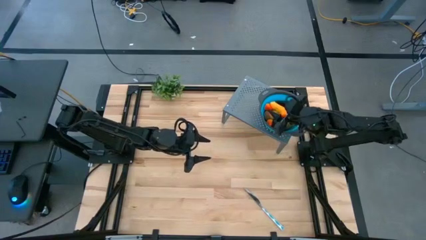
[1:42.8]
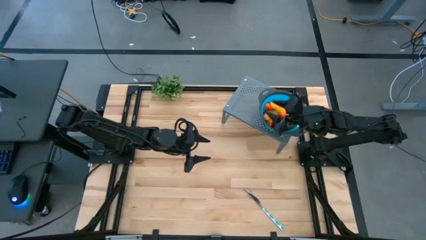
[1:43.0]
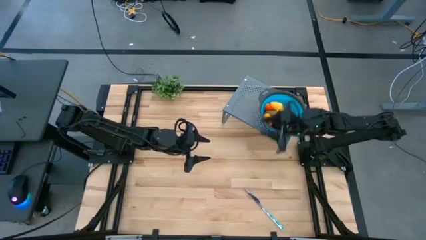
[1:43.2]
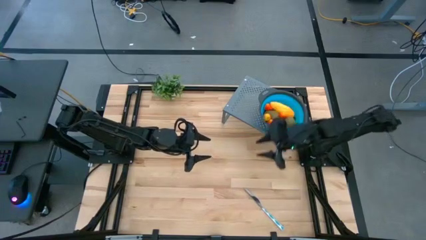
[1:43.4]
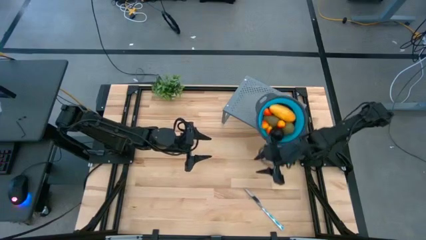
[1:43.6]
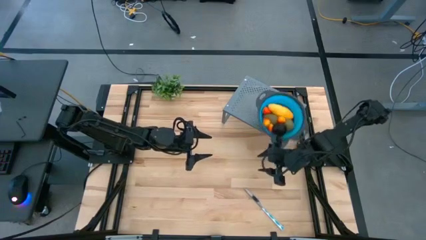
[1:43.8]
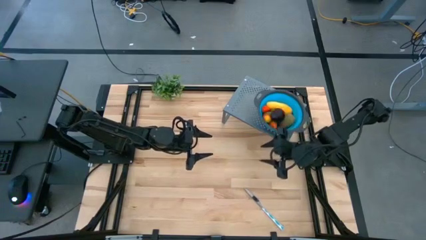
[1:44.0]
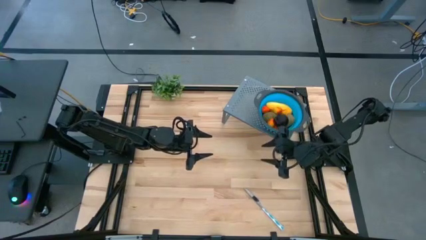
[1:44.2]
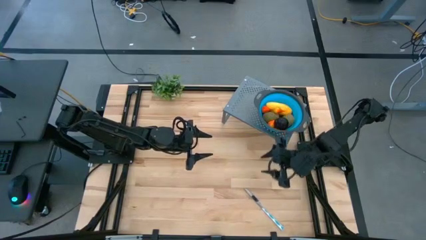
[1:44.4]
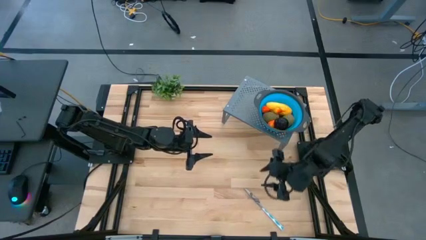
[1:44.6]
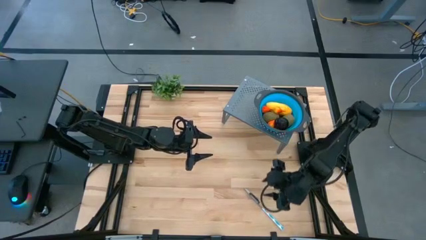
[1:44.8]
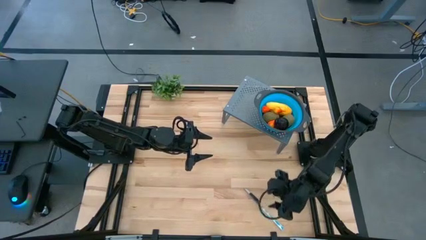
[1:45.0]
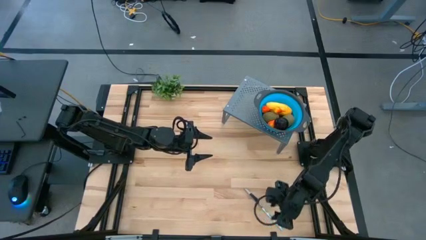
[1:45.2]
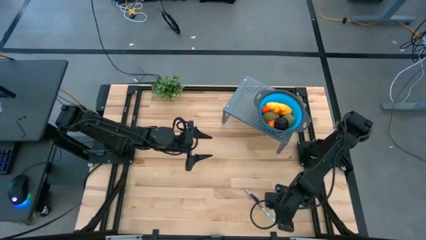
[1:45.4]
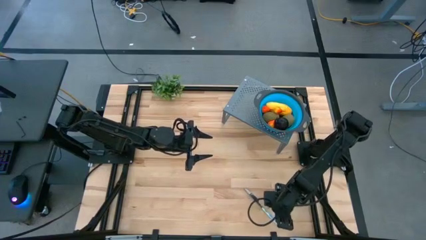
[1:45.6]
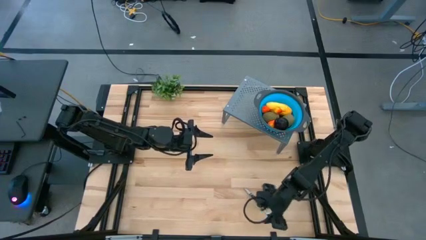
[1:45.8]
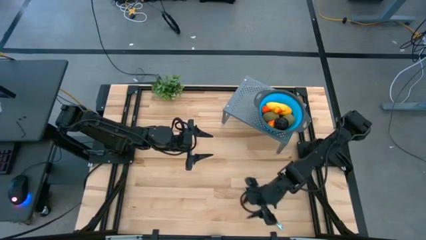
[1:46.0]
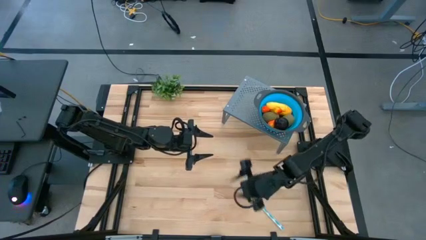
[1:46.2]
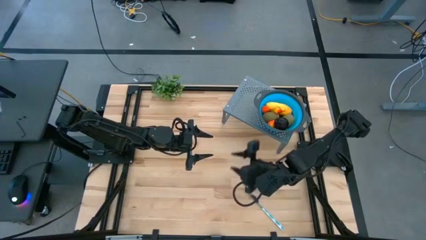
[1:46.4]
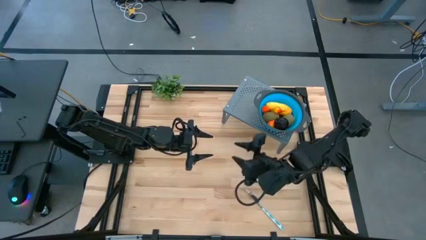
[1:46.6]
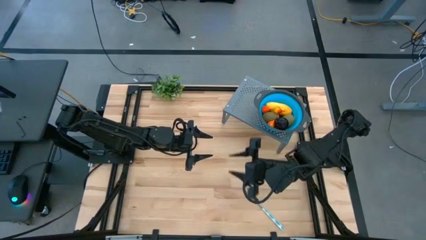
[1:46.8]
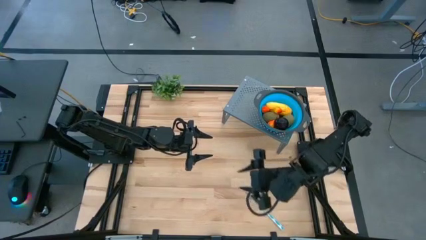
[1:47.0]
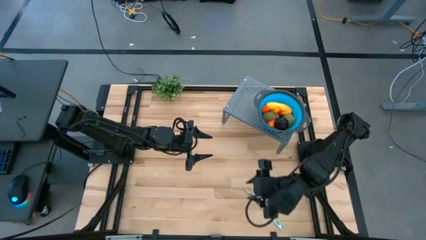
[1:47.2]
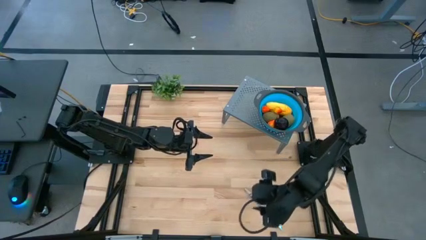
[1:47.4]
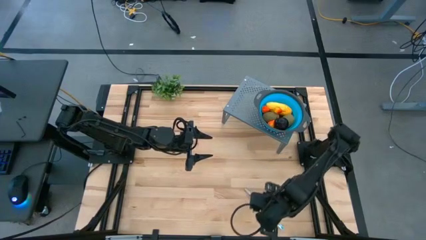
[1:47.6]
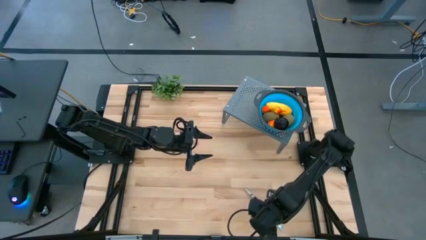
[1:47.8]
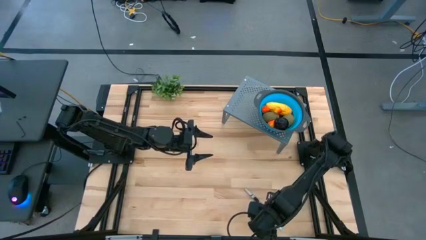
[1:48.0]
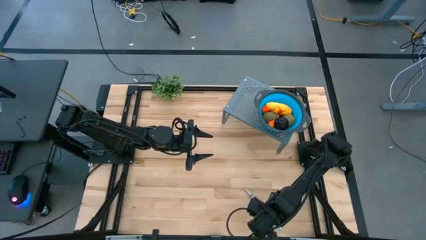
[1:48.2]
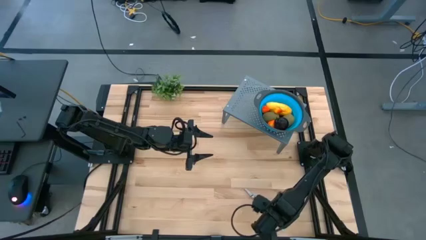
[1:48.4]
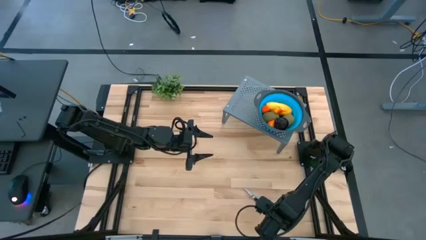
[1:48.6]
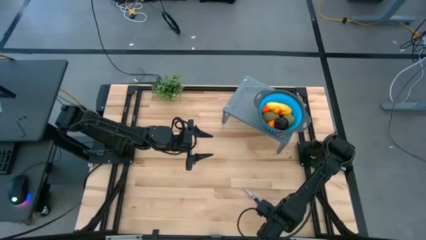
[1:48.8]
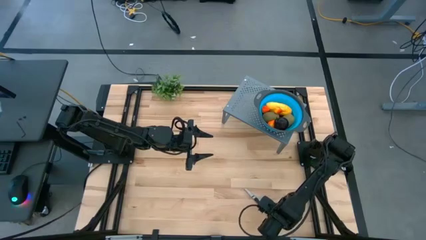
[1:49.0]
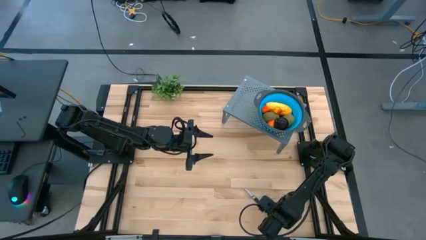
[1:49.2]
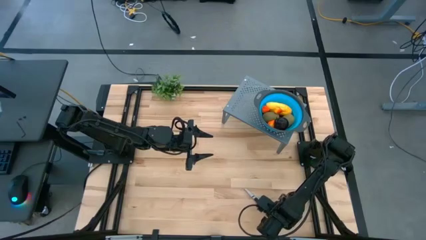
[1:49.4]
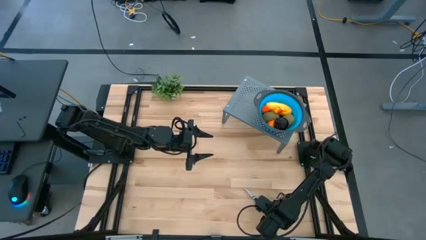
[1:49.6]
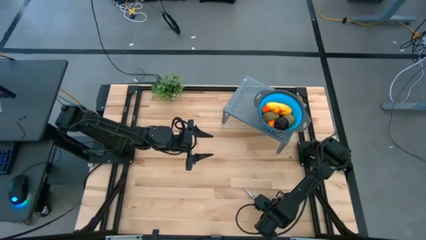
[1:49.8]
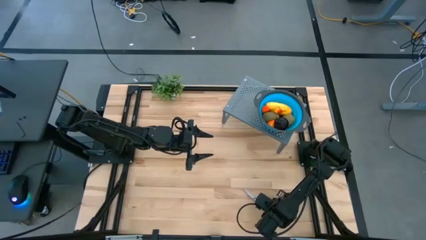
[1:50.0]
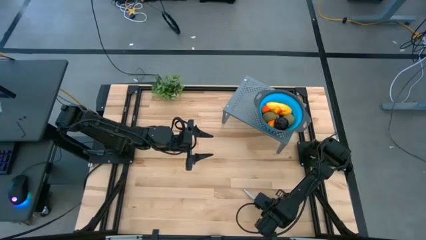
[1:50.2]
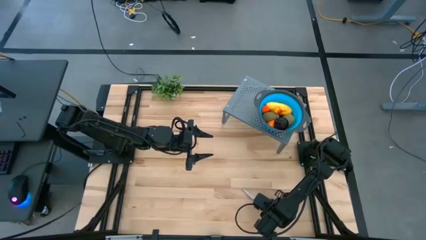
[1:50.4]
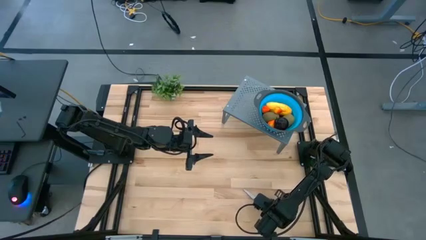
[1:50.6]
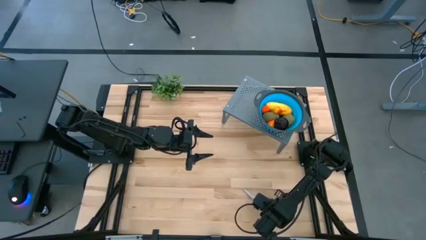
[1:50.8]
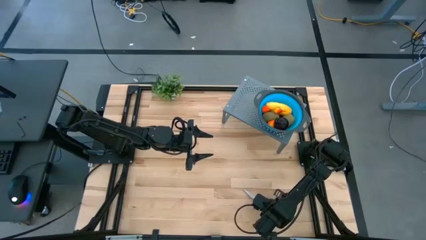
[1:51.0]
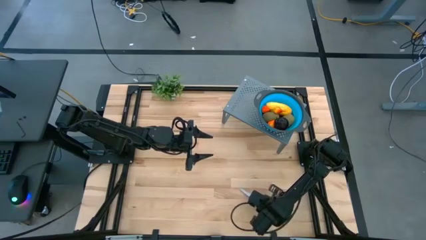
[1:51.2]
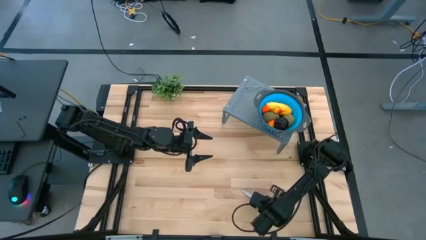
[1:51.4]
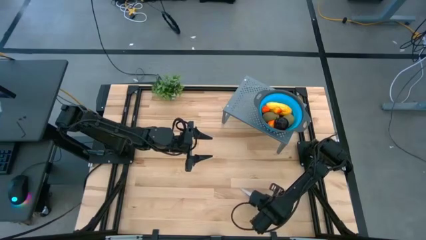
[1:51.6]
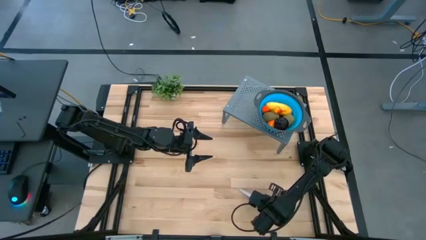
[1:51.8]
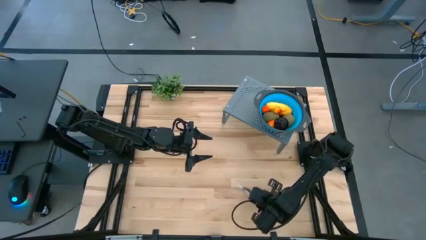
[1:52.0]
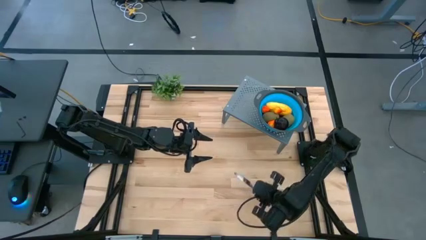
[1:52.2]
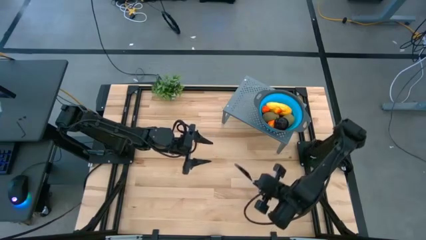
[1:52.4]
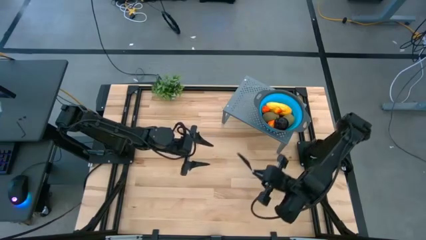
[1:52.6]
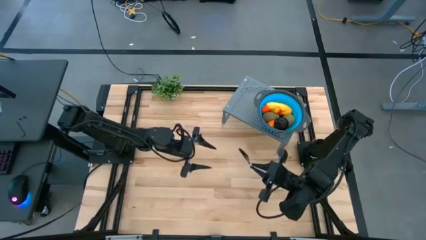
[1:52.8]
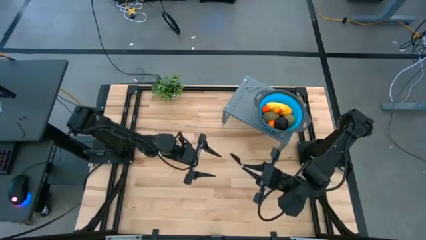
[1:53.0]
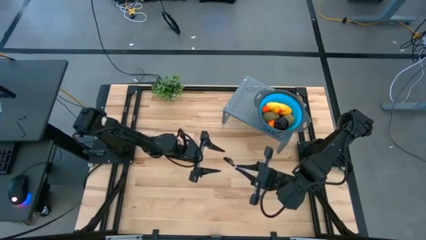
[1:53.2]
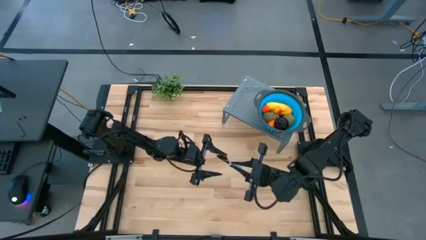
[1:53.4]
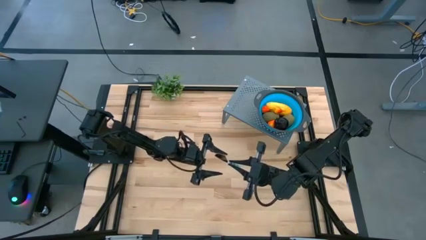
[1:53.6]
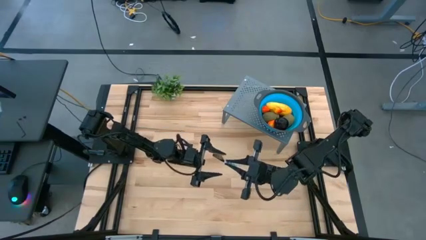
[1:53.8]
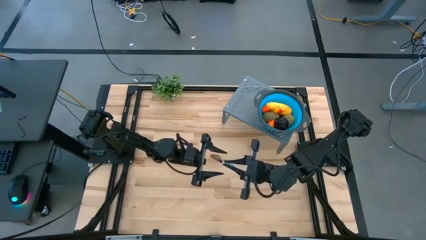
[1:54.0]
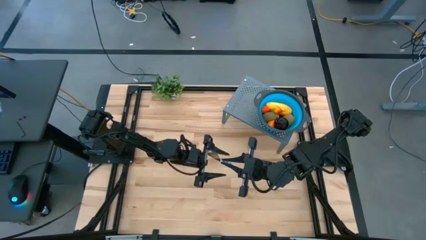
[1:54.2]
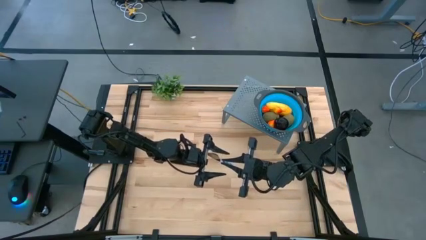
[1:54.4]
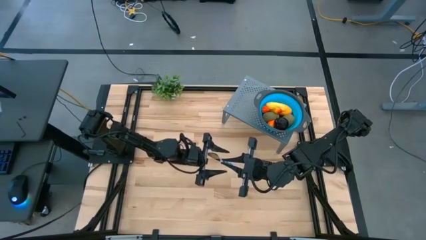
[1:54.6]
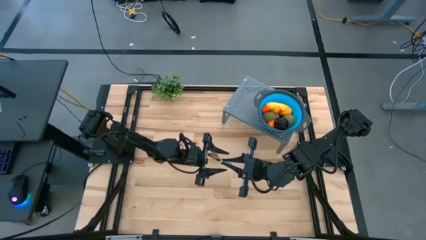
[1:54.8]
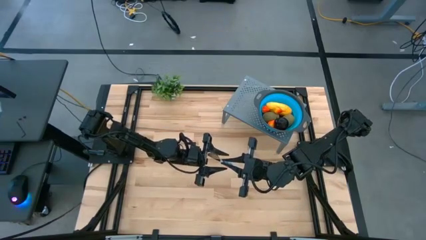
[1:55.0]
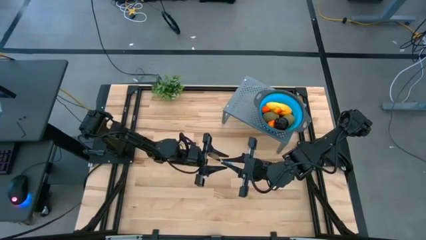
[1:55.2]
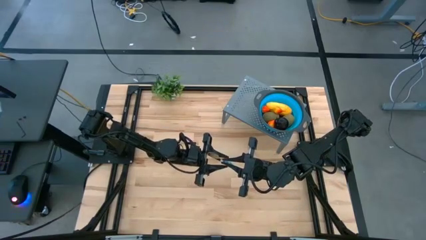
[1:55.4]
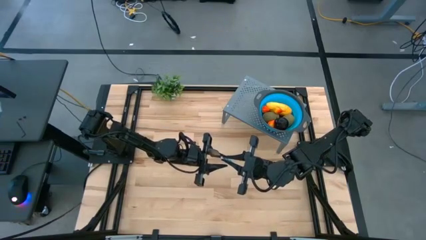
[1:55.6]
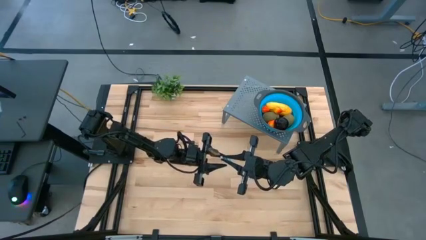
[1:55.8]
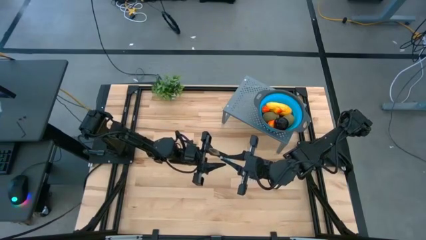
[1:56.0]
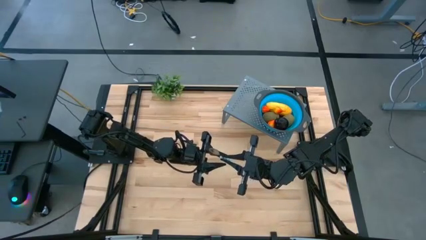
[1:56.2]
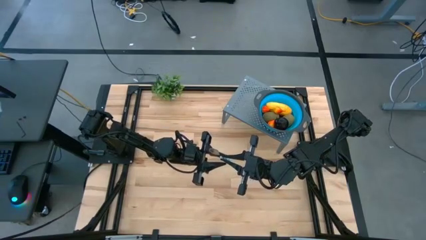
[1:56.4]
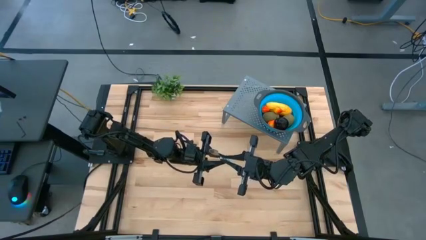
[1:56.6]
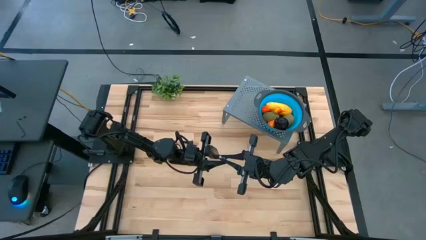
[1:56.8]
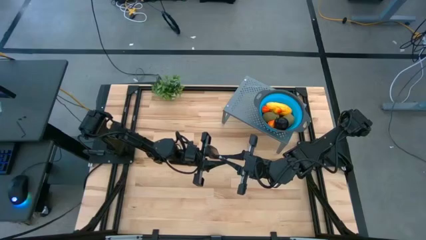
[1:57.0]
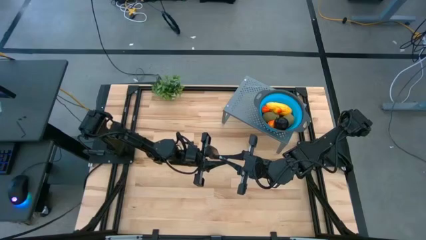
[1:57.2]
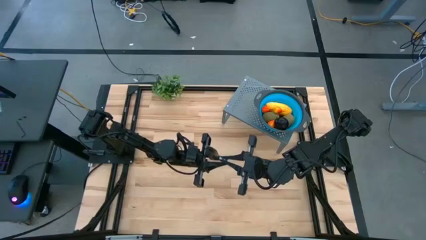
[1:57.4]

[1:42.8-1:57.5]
Task: Pick & Place Fruit
Put the knife on the shelf
